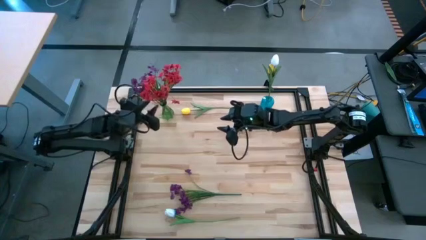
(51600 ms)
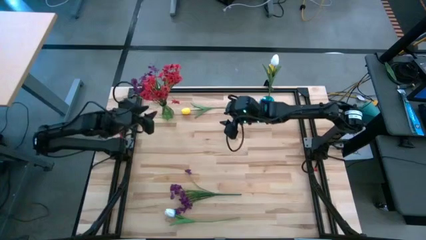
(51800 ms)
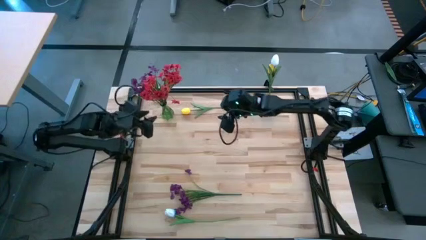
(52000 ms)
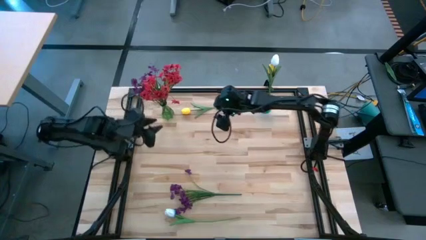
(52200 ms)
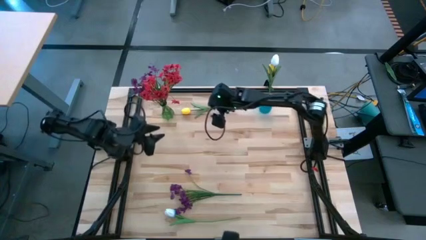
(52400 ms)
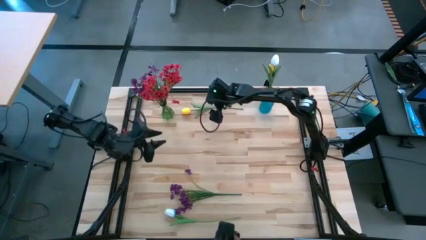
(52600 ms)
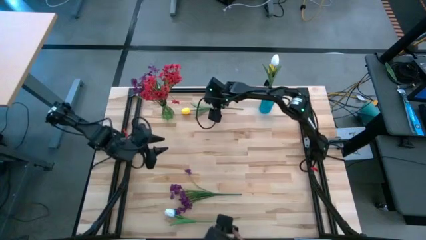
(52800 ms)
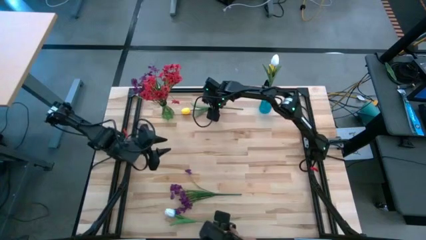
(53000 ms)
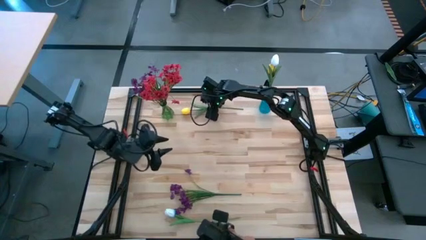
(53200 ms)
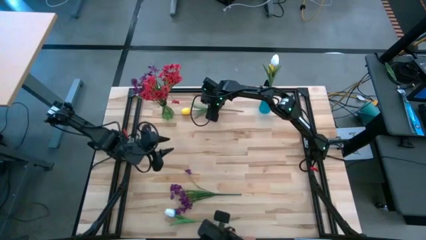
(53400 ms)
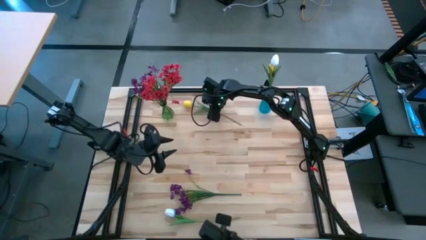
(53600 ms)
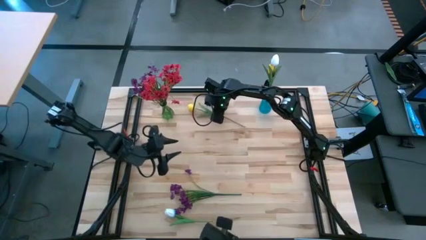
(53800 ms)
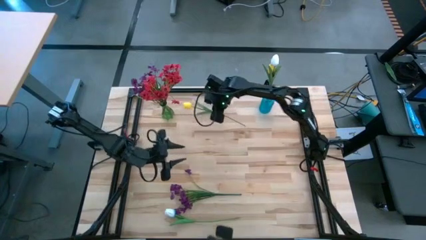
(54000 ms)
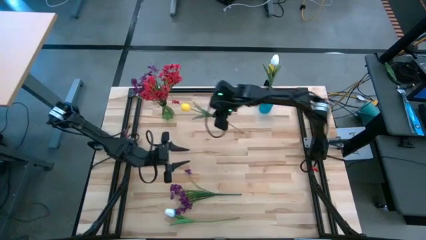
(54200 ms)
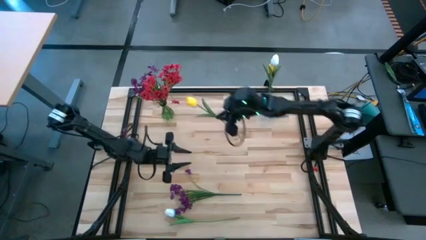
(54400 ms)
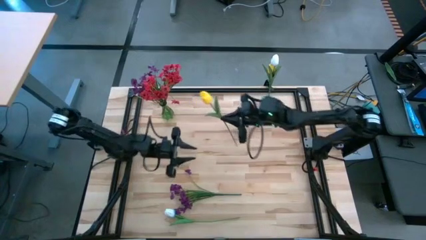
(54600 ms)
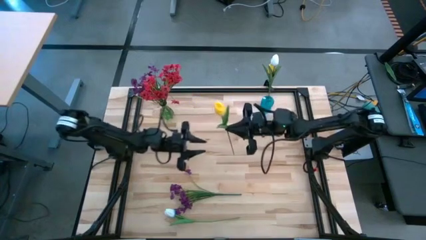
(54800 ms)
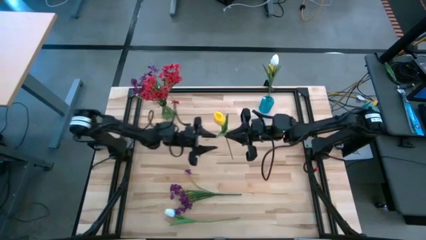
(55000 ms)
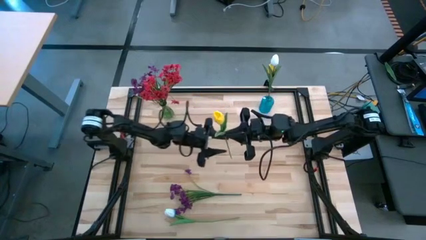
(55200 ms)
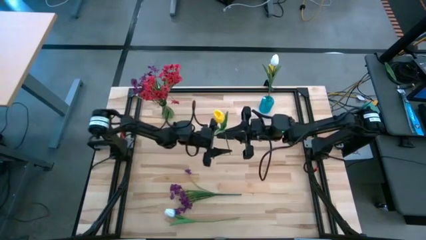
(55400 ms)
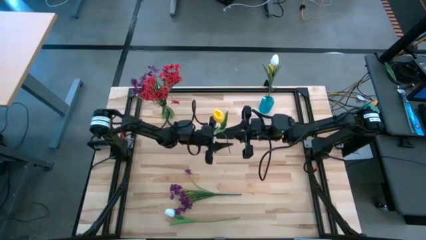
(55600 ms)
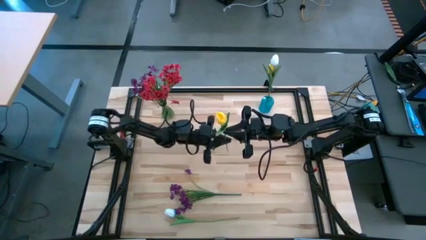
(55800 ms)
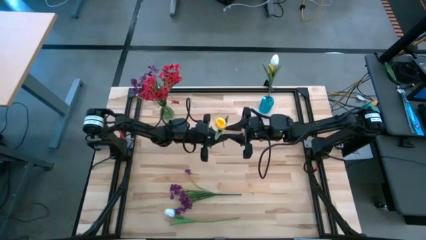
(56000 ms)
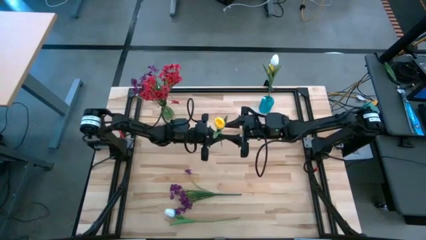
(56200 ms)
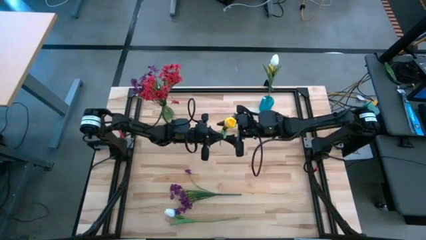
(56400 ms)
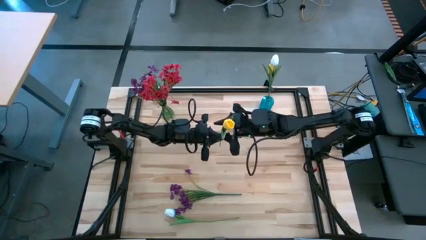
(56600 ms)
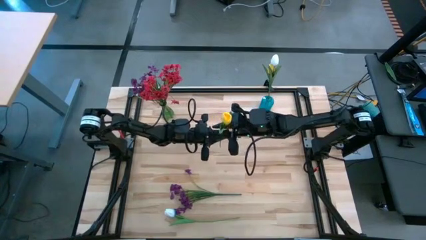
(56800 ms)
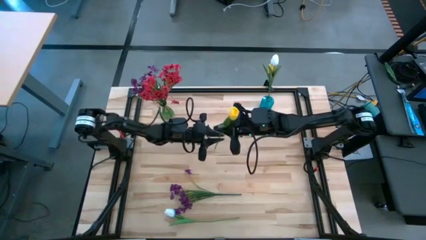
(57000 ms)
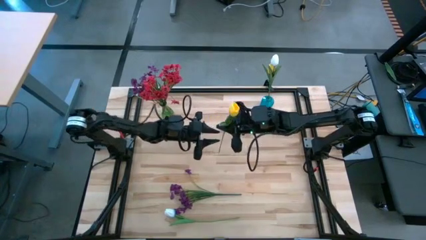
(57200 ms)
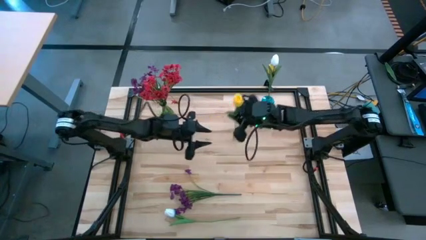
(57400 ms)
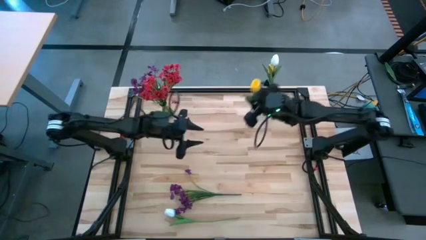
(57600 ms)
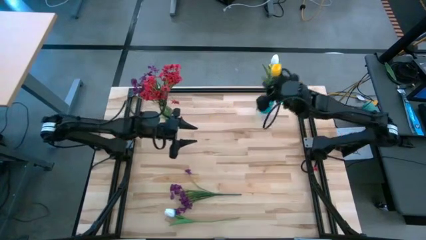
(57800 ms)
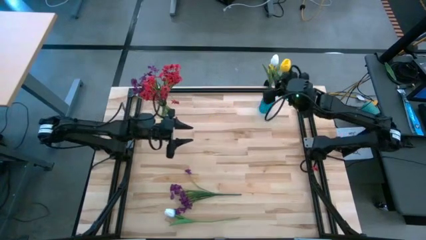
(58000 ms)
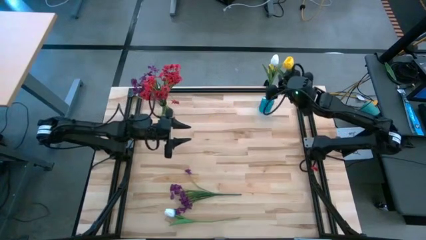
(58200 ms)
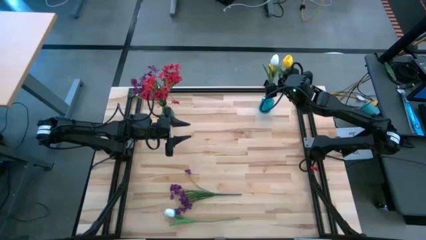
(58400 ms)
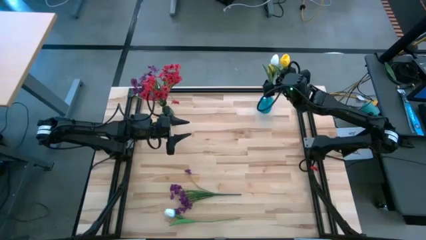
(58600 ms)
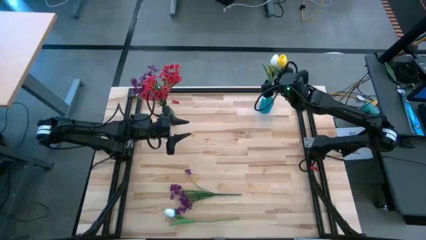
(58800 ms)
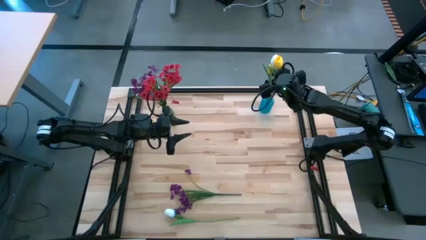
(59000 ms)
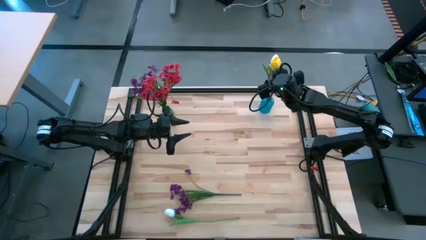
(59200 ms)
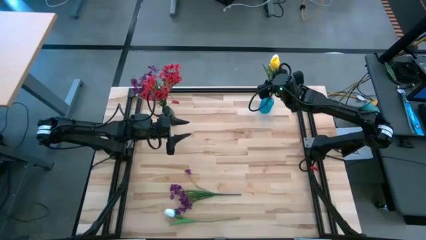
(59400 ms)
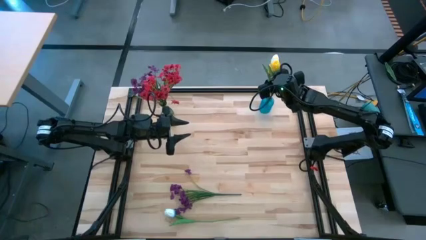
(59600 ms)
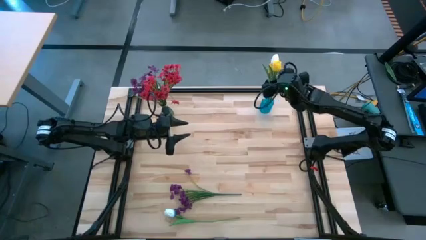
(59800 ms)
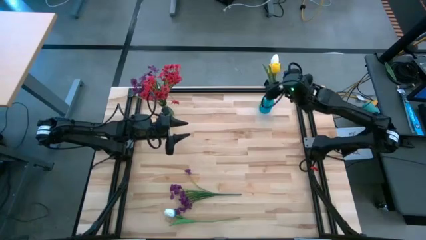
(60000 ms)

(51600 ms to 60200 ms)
Task: Sort flowers into vase by color
Put the yellow tulip into the blue vase

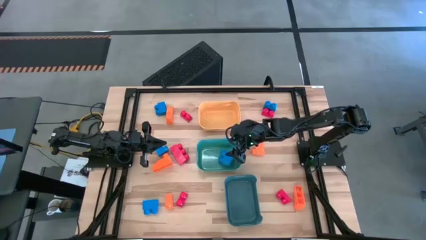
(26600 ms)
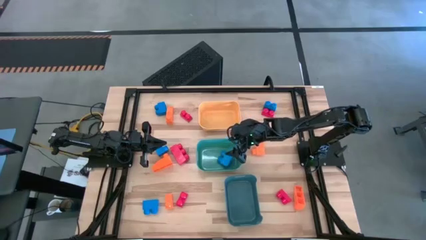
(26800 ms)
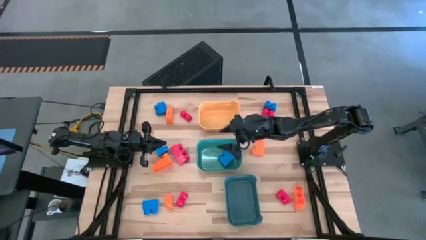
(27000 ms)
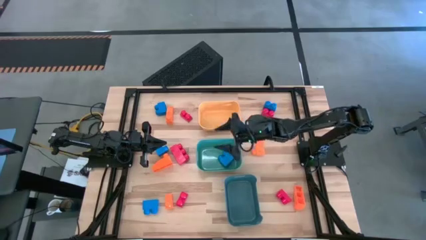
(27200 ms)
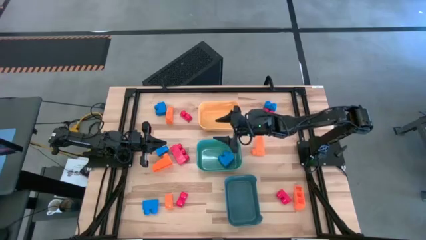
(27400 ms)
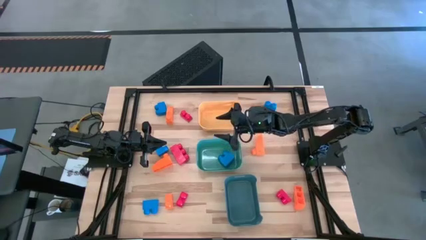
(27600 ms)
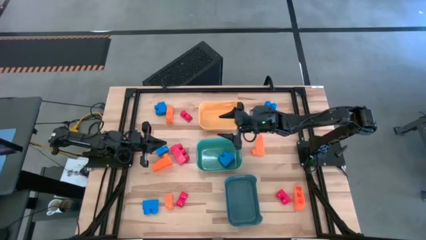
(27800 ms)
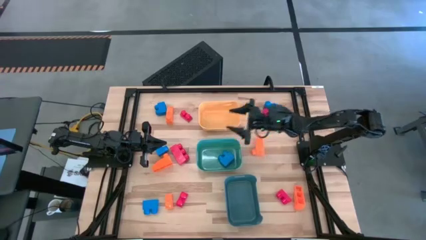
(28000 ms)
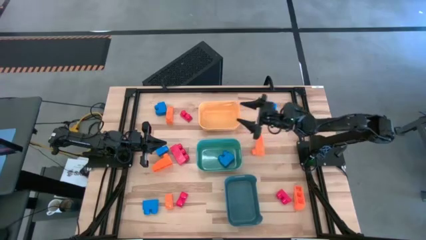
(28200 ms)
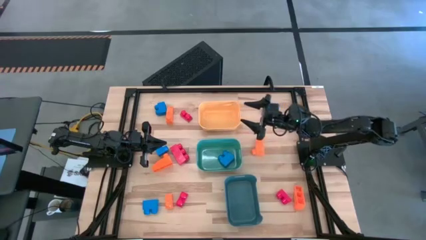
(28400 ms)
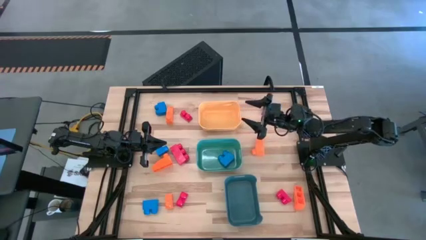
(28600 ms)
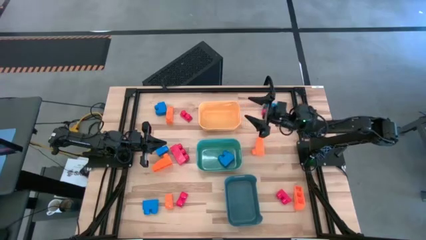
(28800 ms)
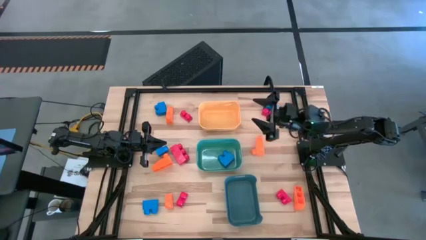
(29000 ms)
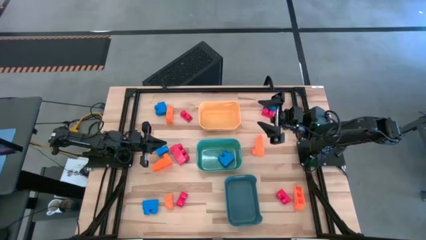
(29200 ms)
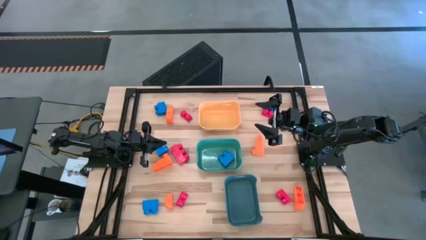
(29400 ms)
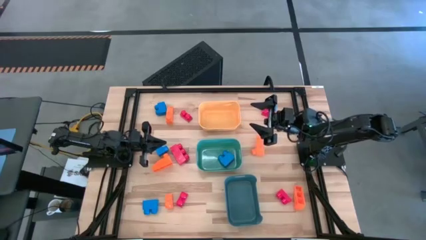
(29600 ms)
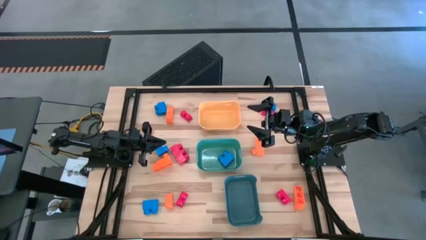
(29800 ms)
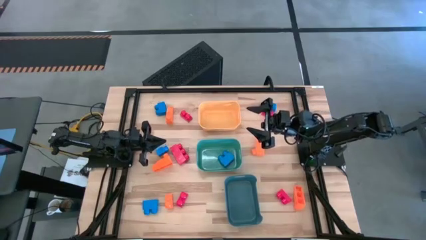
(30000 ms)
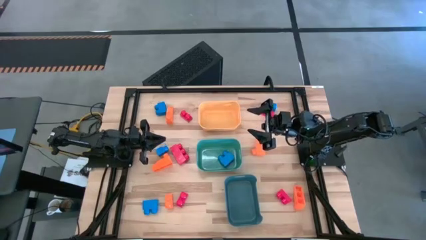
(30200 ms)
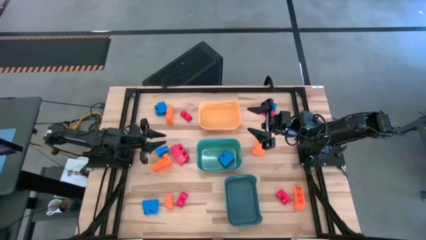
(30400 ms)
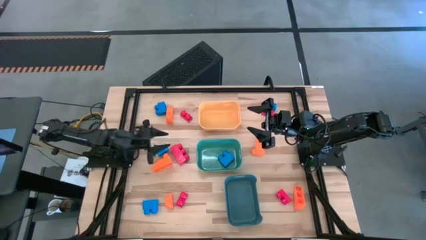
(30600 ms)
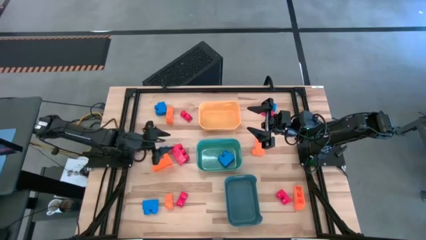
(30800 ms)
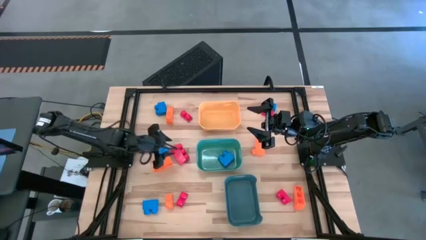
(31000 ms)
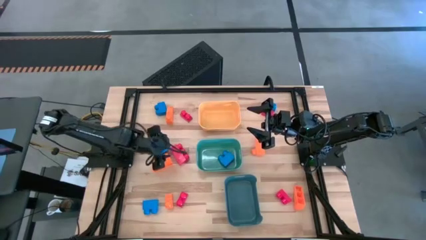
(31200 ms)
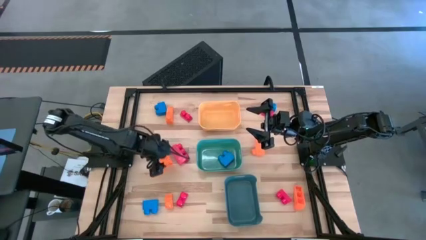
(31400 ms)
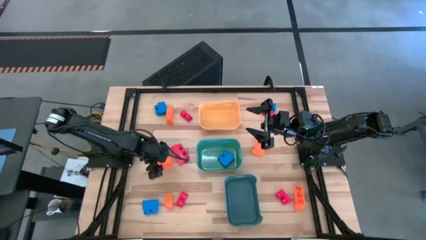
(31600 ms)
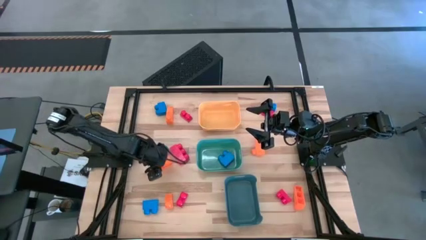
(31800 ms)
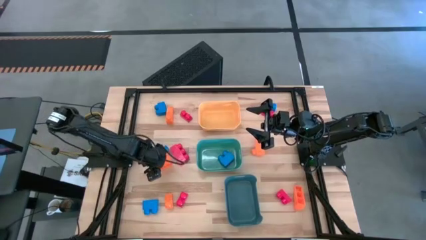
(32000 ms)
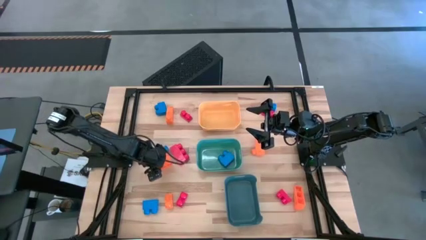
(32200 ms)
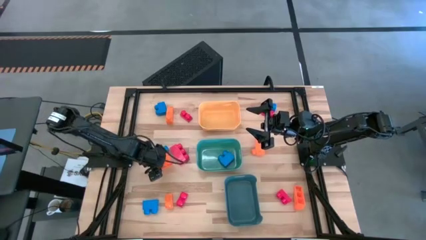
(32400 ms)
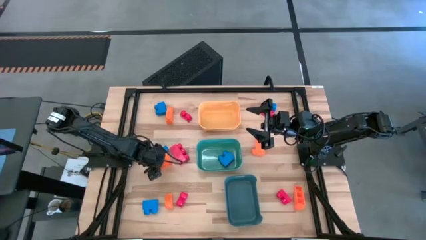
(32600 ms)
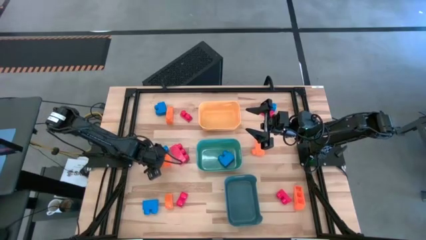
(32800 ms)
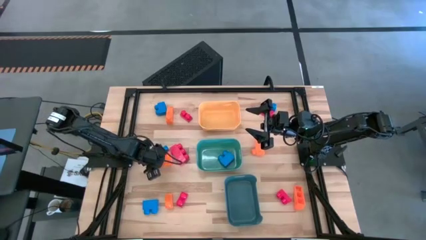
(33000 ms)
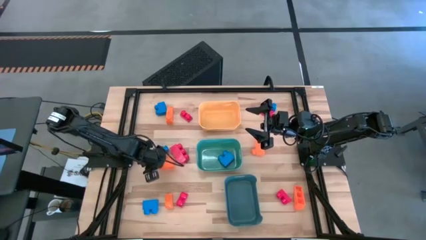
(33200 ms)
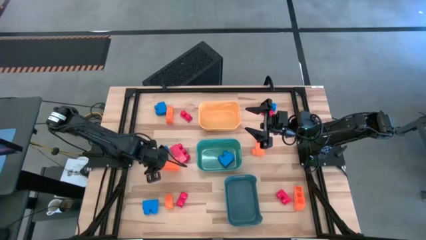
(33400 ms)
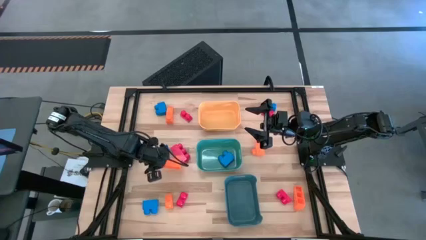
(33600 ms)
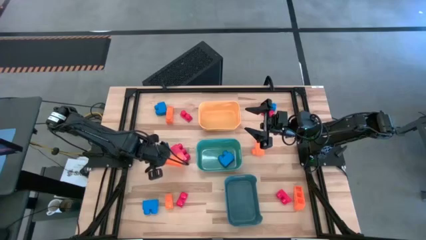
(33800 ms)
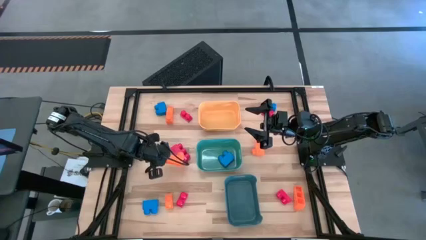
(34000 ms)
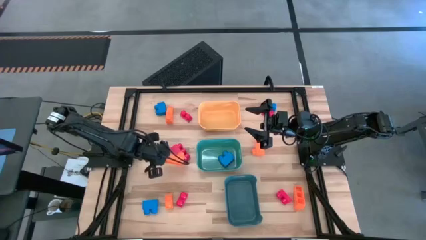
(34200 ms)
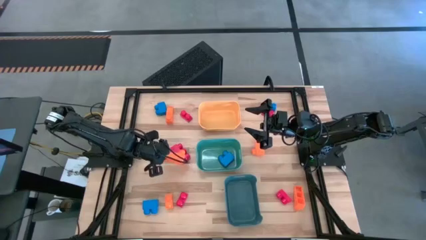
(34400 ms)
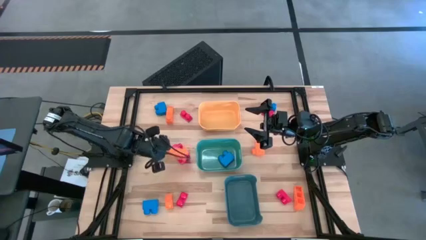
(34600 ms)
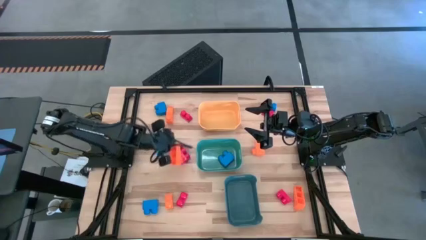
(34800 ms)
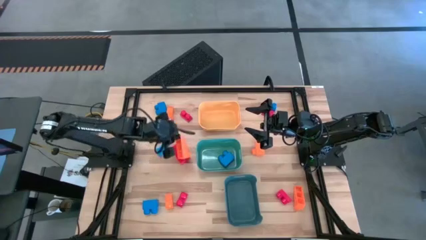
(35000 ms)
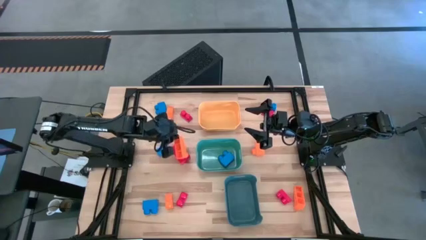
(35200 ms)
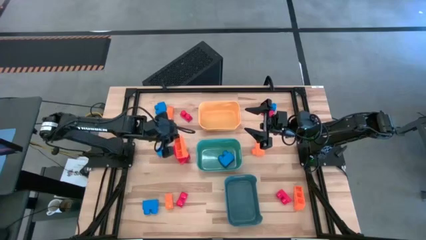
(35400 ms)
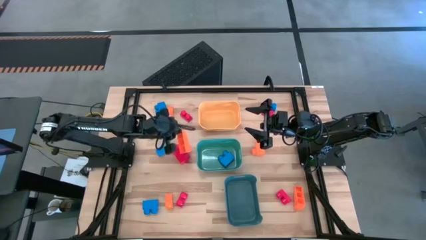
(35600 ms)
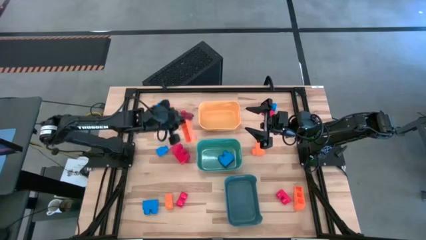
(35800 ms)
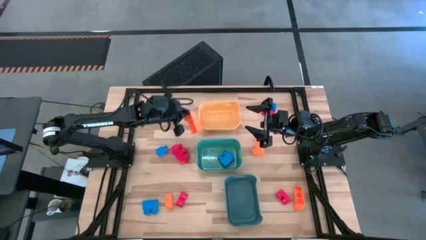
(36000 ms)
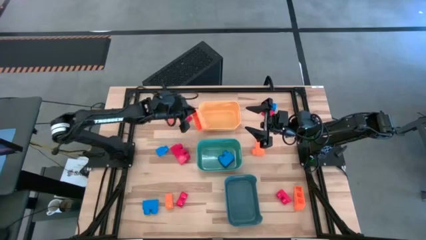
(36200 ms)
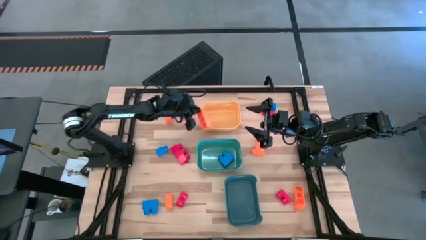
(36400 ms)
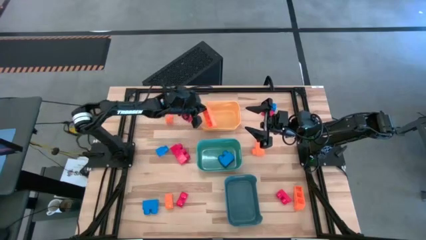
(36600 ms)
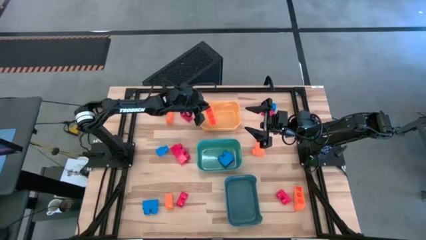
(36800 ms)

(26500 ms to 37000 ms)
Task: Sort & place blocks by color
Put the orange game piece into the orange bin
